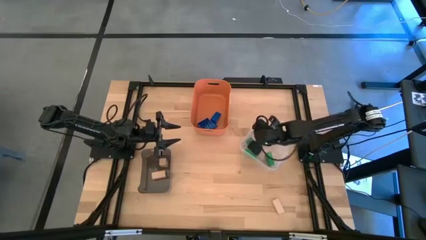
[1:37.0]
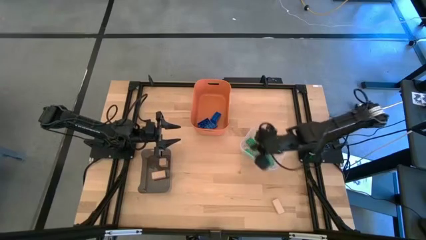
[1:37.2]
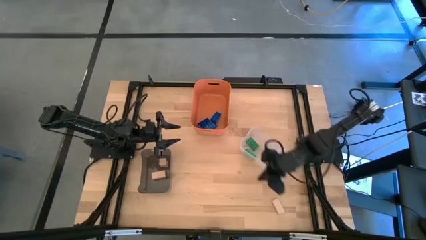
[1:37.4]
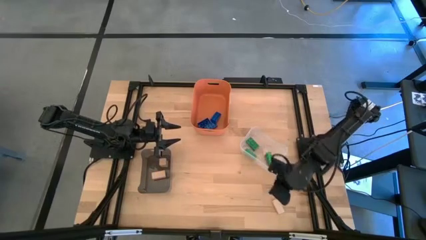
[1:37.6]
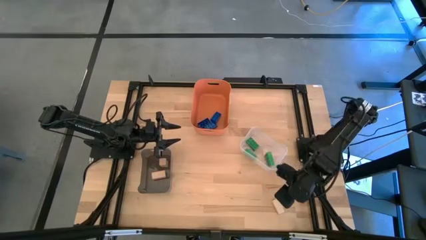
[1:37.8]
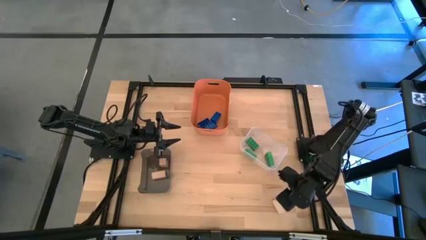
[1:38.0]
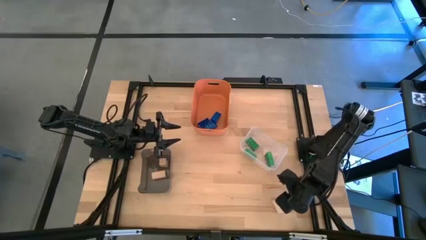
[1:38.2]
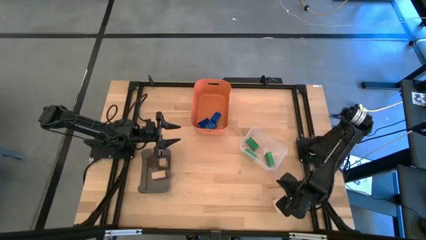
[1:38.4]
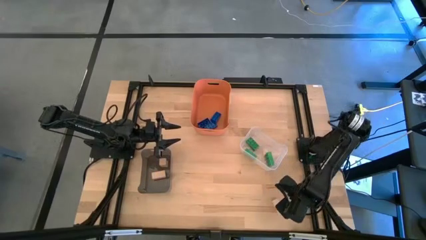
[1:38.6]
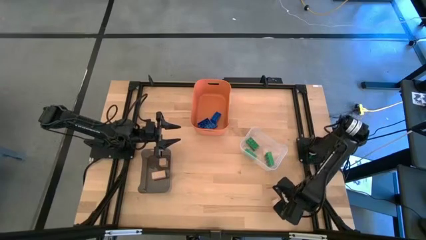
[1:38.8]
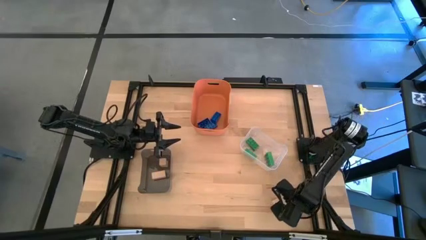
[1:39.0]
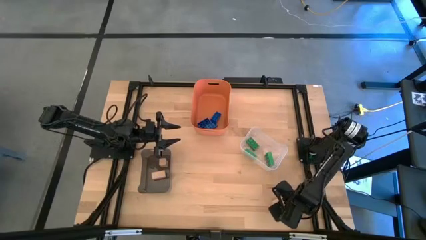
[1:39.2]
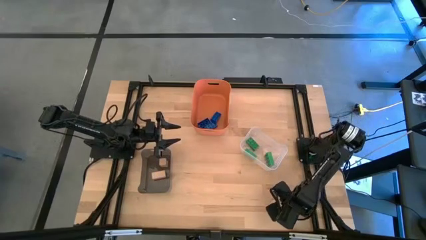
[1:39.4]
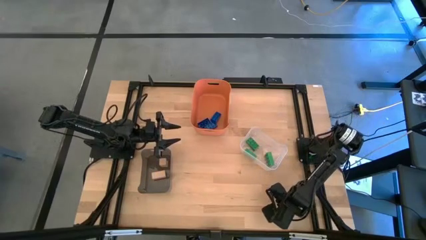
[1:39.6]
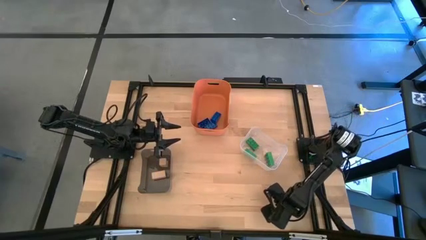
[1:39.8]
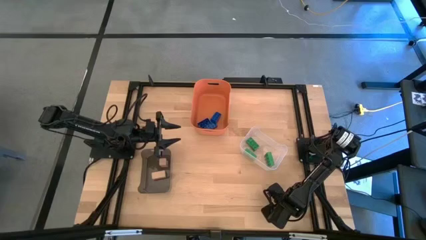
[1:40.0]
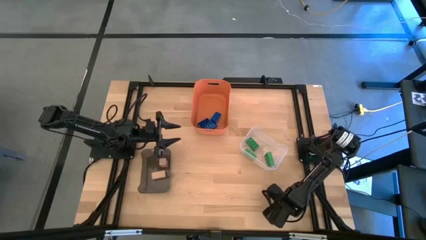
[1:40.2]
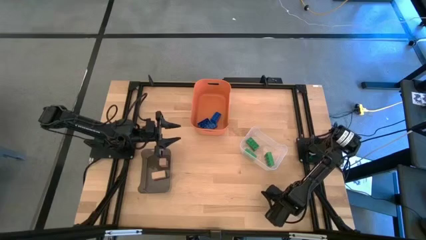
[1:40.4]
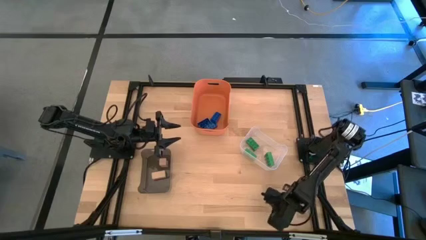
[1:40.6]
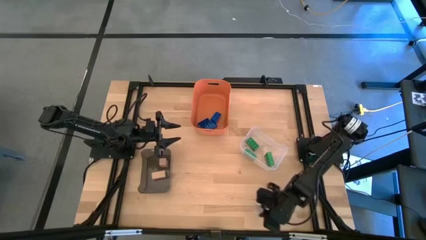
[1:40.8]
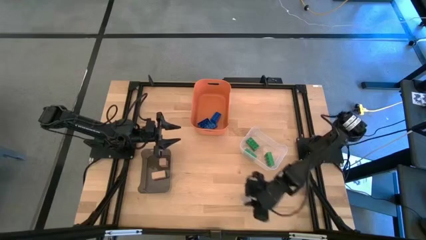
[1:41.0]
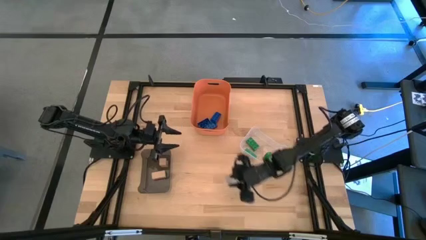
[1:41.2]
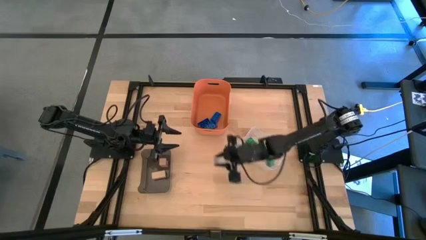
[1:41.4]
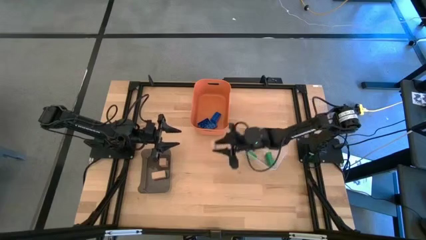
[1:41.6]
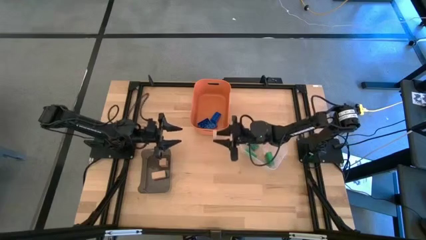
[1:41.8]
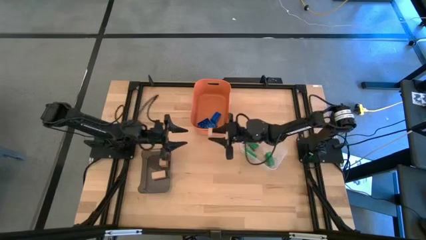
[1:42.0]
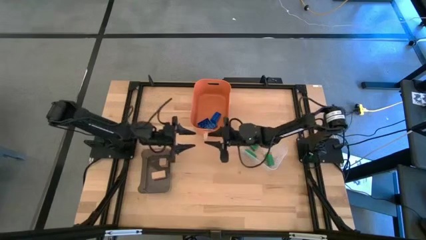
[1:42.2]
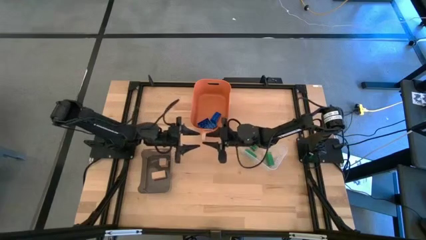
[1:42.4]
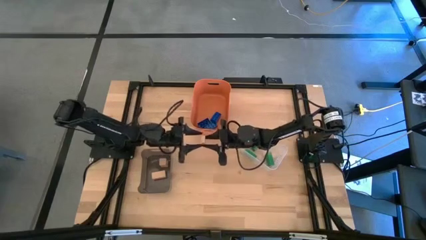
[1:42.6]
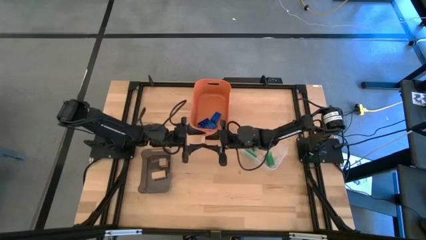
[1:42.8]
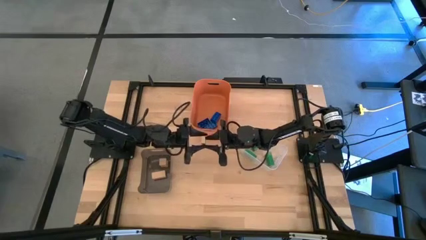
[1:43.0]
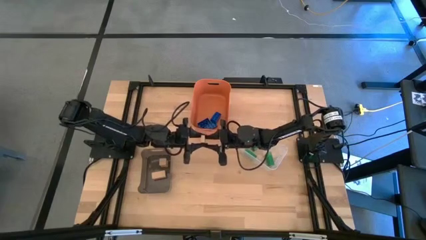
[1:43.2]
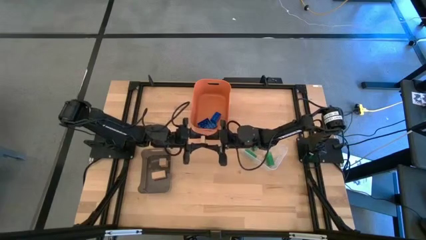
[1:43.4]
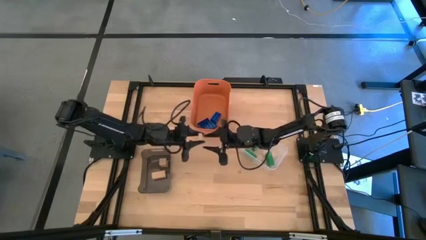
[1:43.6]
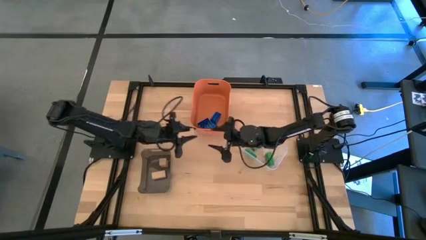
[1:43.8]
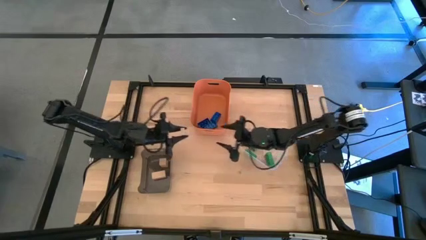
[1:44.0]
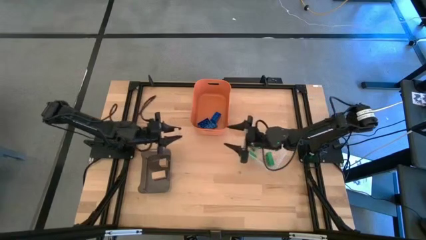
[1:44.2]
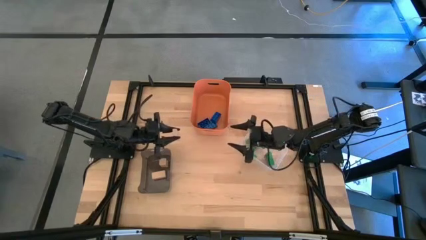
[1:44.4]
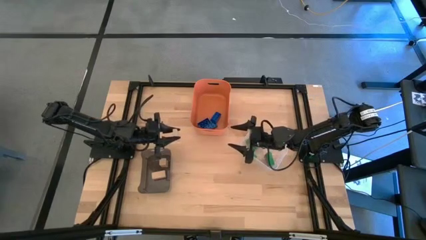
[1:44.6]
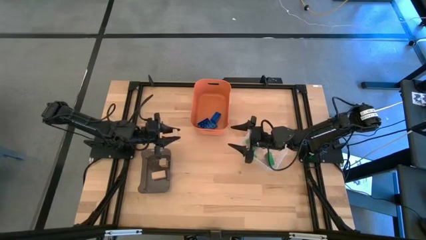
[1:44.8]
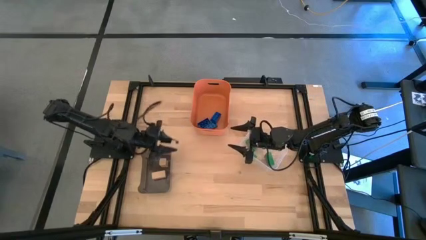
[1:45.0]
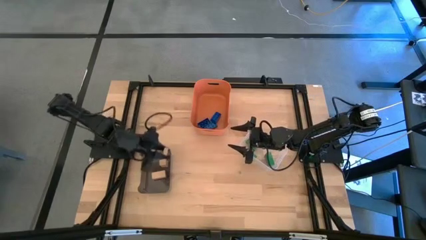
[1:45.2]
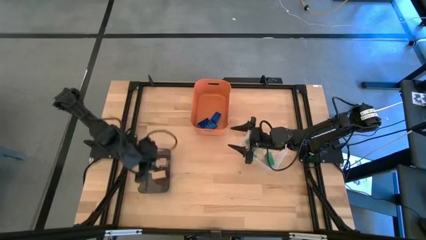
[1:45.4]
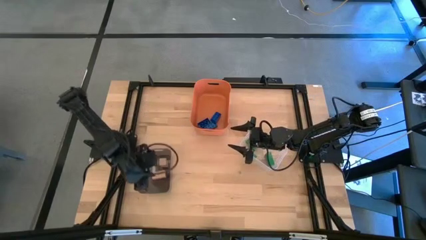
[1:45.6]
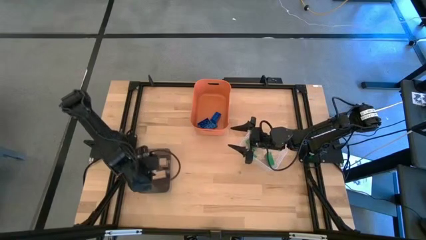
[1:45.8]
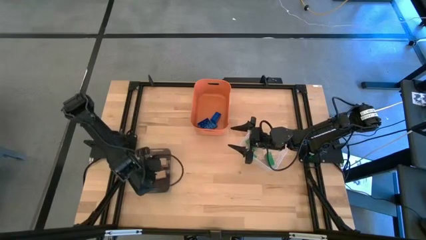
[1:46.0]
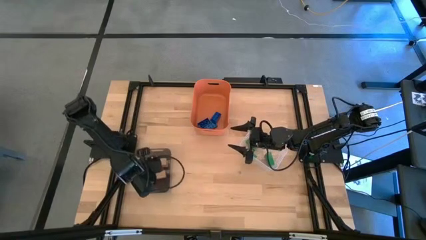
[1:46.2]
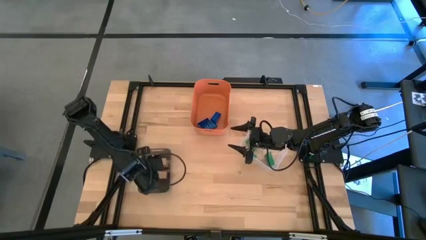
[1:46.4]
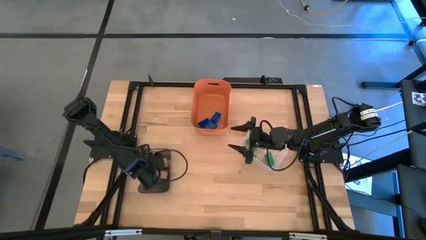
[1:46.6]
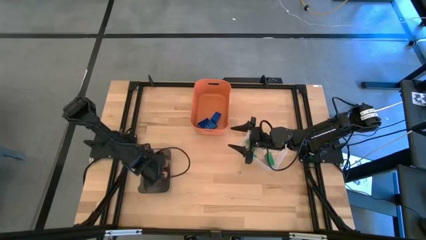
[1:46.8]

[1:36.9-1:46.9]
Task: Sort & place blocks by color
Put the brown block into the black bin
